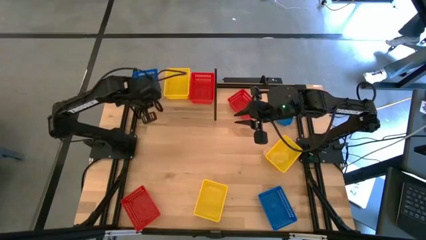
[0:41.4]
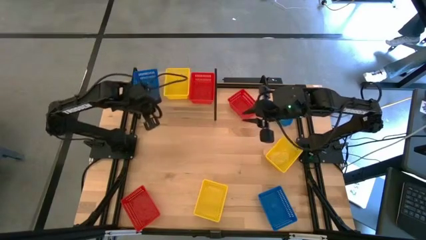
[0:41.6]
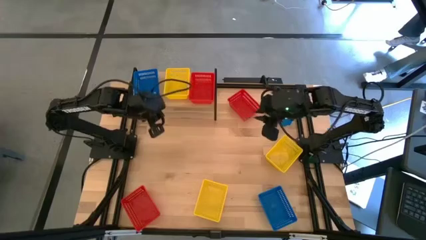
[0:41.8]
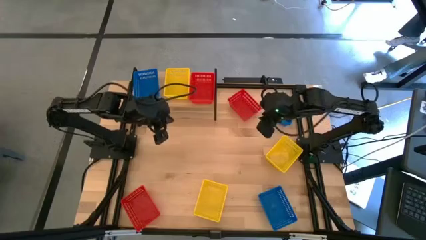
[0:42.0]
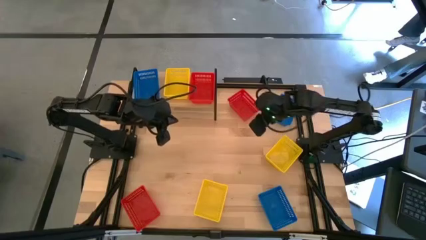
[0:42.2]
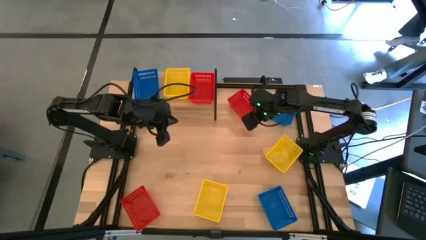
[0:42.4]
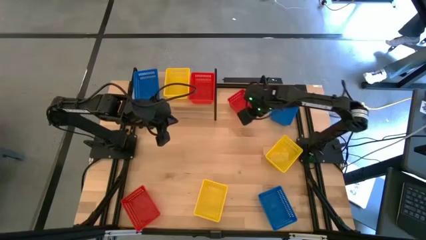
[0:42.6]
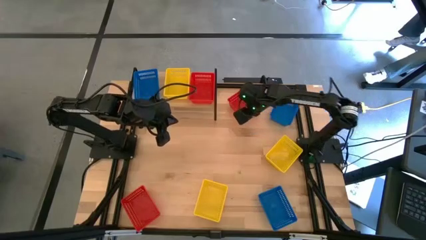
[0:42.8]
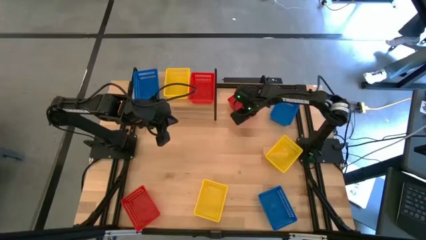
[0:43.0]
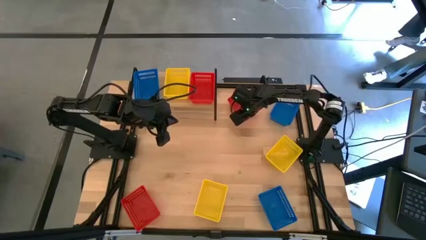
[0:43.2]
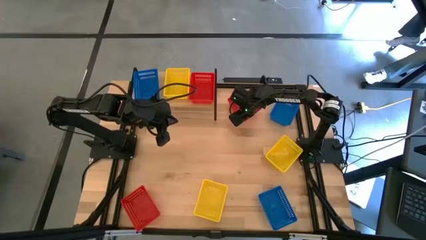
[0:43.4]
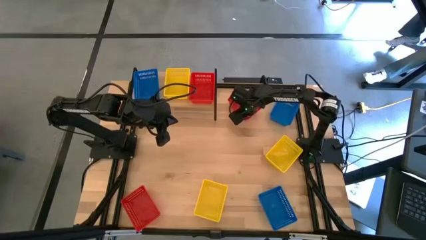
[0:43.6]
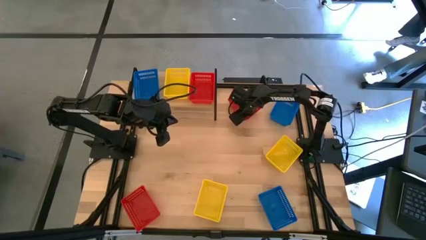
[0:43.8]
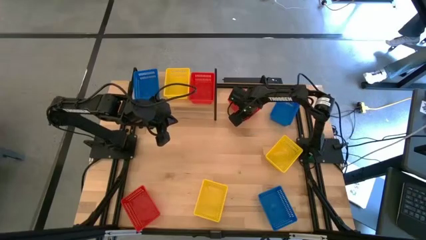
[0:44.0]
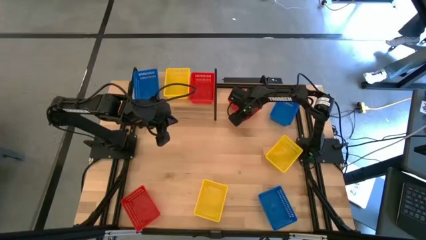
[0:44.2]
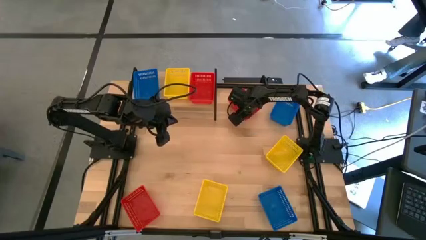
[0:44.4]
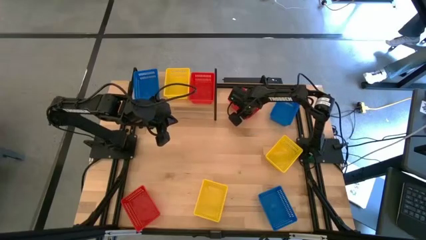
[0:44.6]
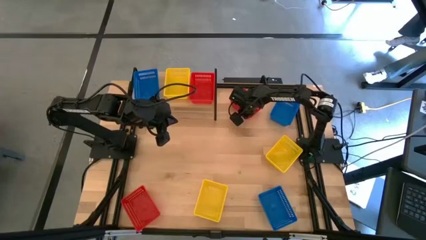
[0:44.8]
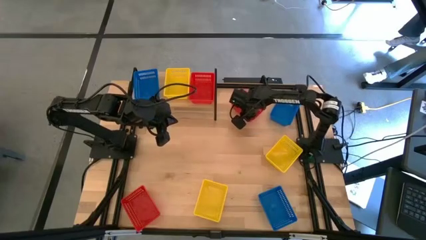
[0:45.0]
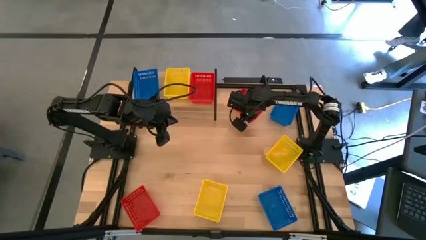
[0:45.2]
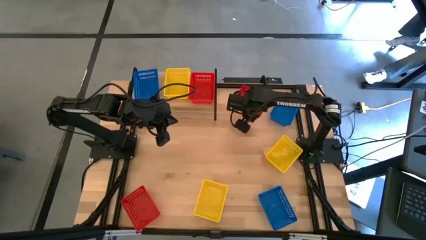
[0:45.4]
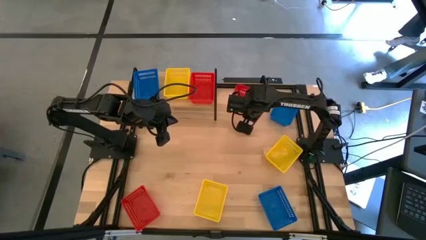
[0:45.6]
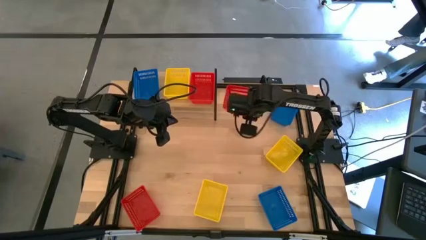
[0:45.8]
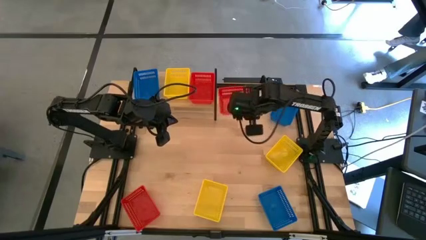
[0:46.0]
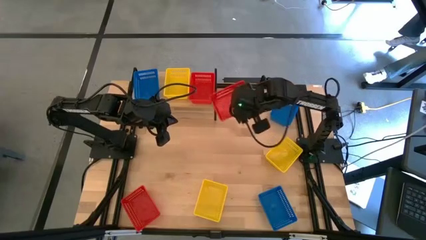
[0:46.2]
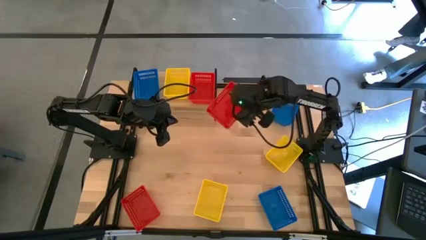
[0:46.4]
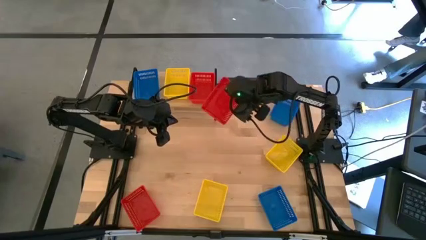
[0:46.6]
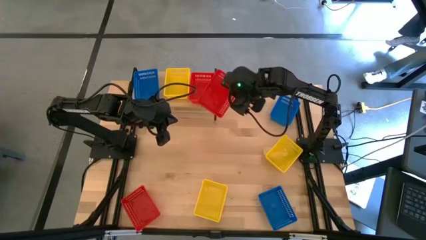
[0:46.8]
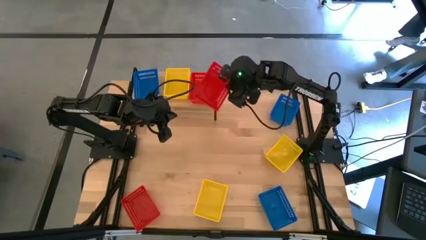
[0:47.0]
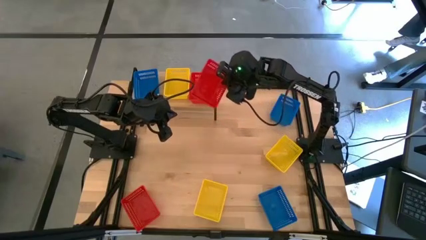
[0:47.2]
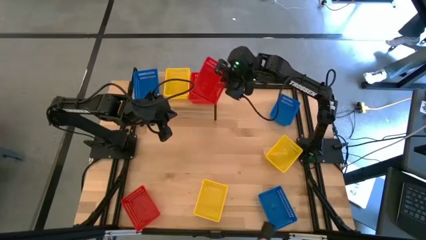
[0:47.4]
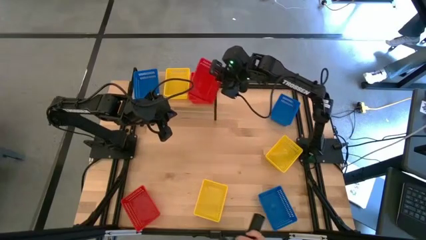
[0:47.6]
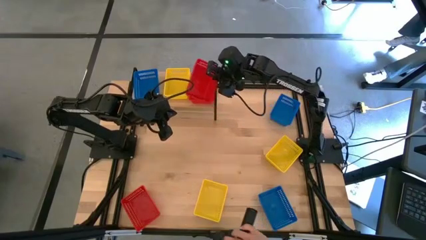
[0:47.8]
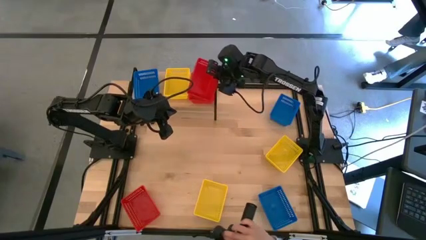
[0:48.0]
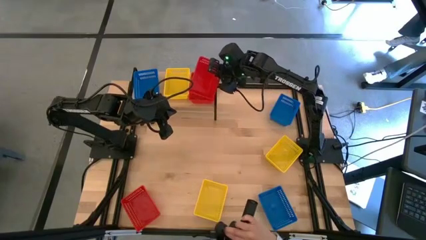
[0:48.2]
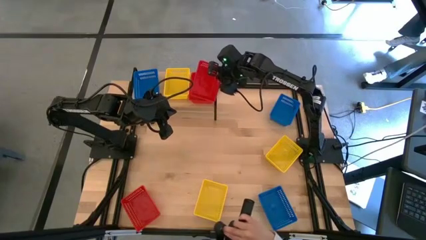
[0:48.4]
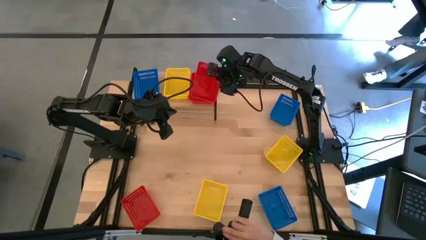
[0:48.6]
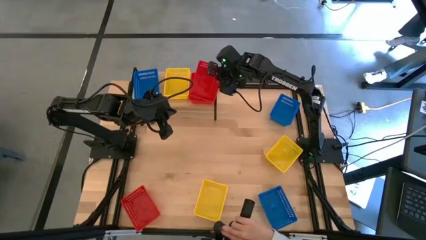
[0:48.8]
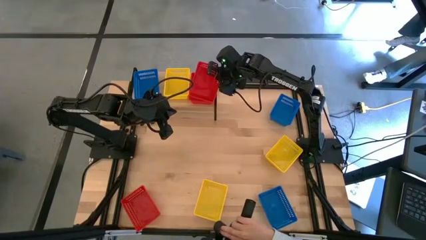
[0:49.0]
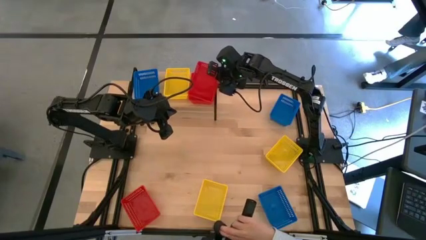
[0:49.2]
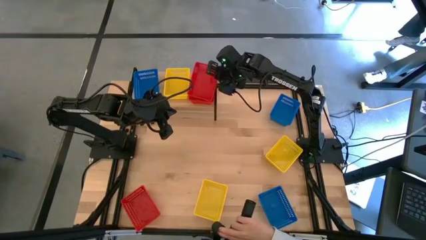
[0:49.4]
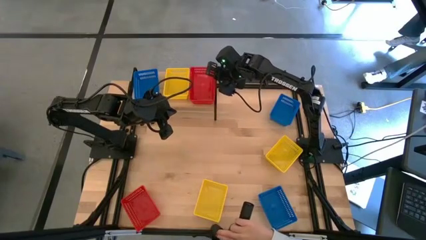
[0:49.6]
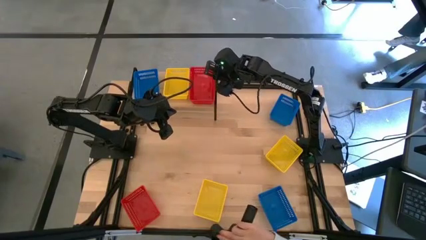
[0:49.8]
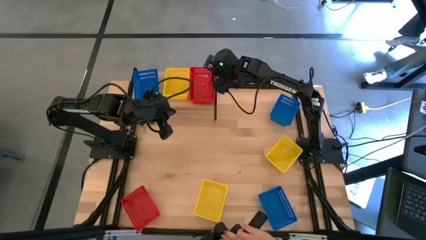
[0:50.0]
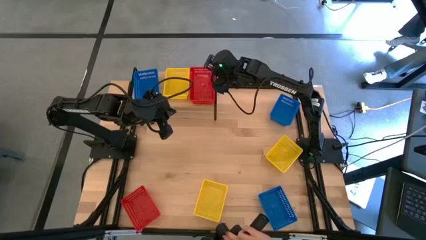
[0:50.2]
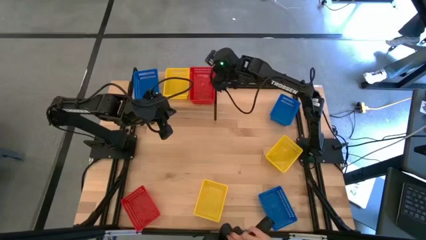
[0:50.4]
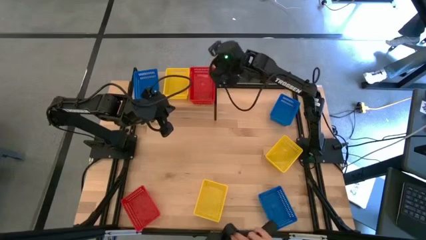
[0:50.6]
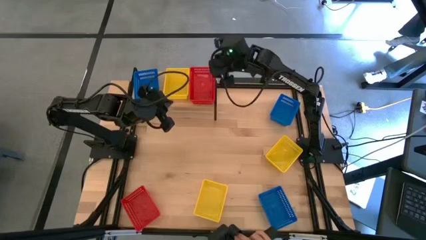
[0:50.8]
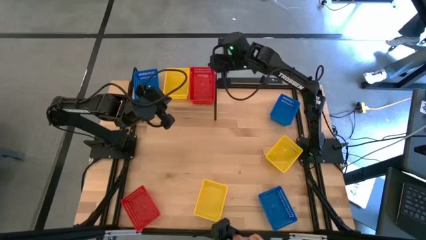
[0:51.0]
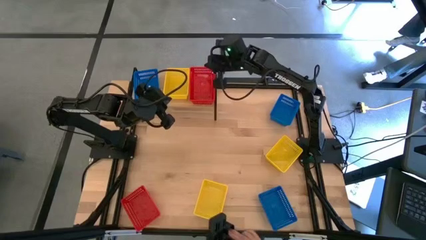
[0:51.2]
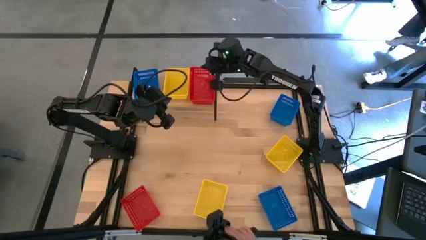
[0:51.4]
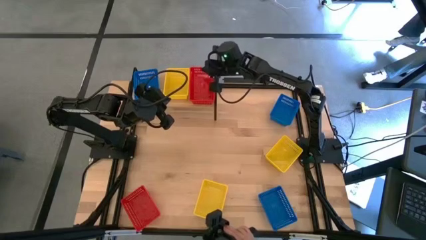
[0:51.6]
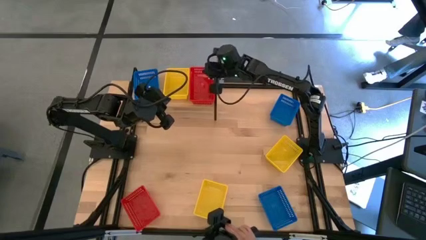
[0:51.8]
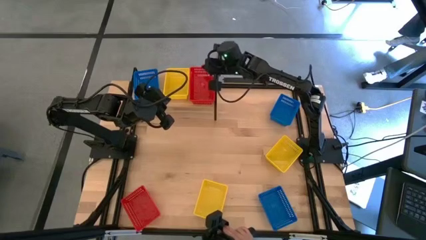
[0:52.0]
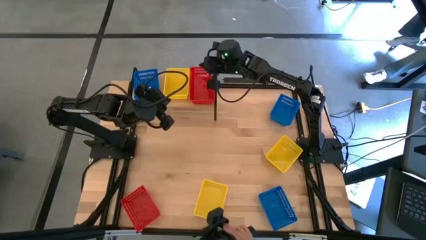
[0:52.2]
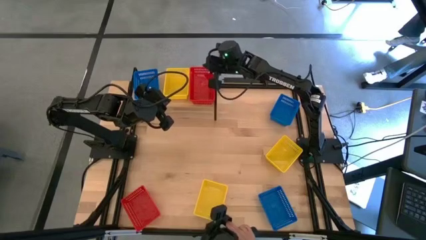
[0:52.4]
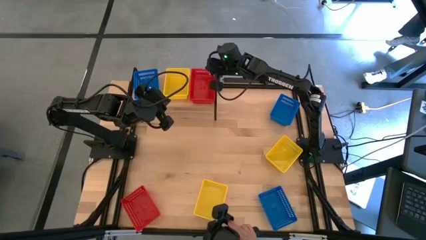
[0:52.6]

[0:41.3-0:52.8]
Task: Stack baskets on shelf by color
Stack the top red bin on top of the red bin on the shelf
